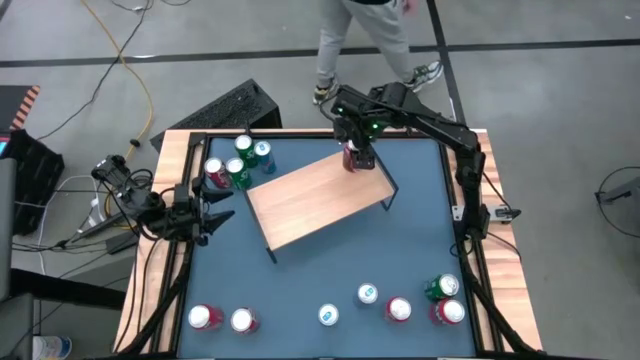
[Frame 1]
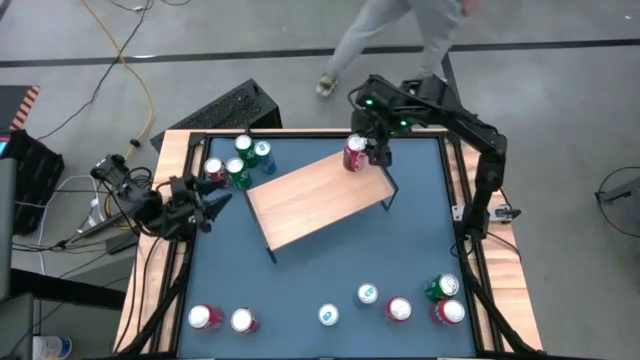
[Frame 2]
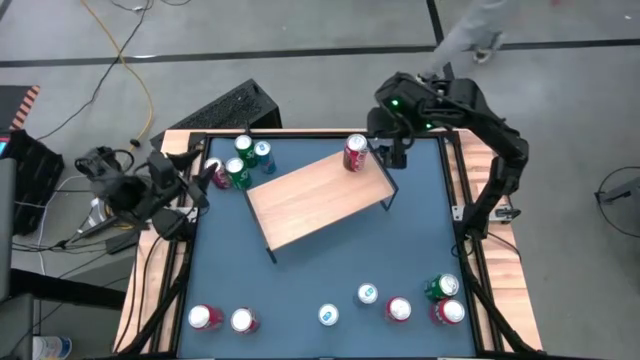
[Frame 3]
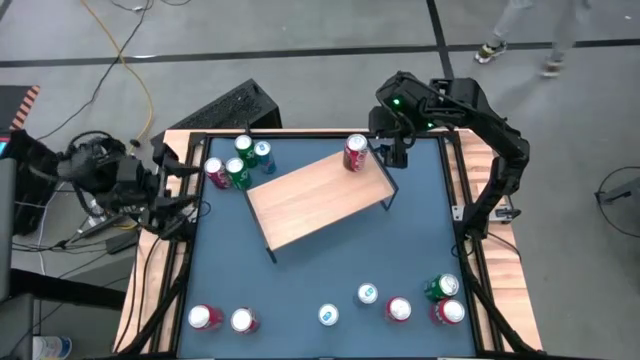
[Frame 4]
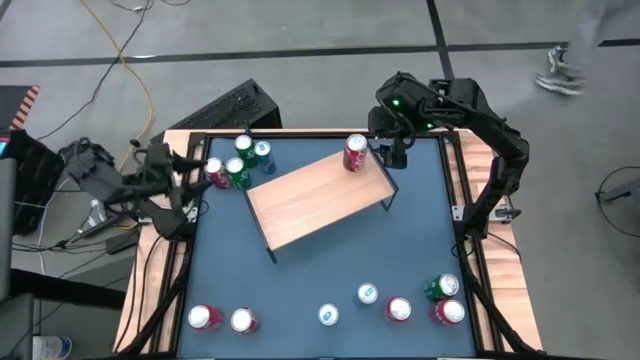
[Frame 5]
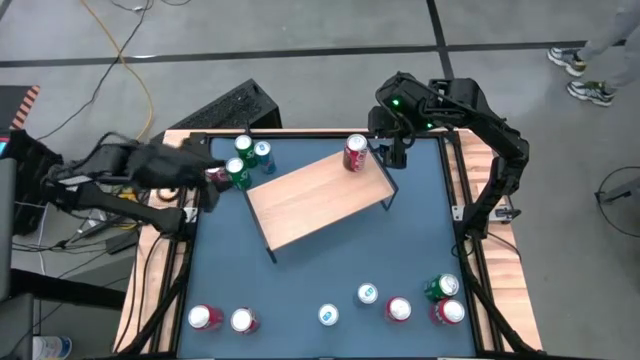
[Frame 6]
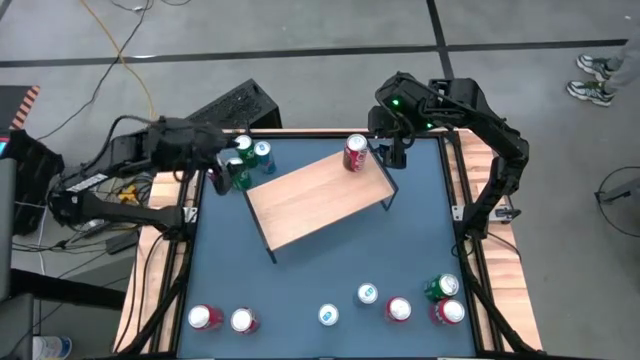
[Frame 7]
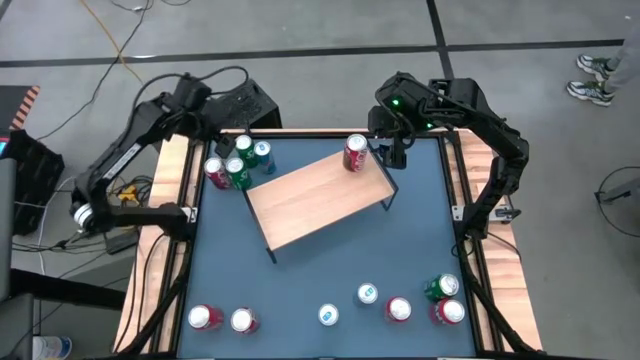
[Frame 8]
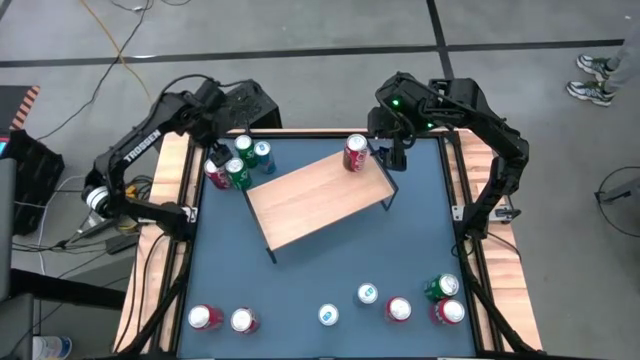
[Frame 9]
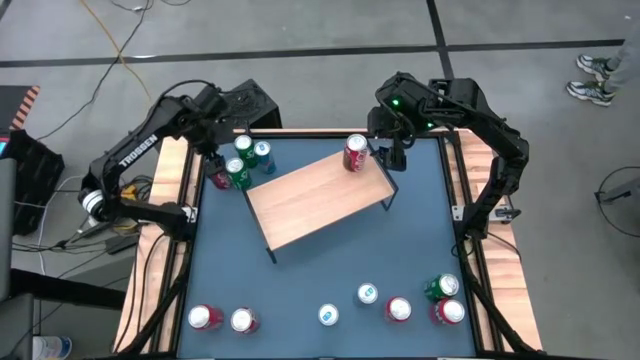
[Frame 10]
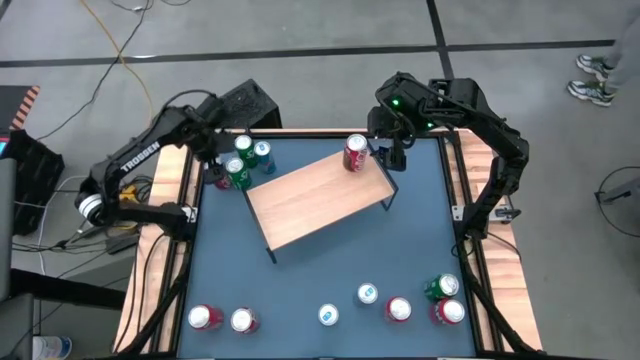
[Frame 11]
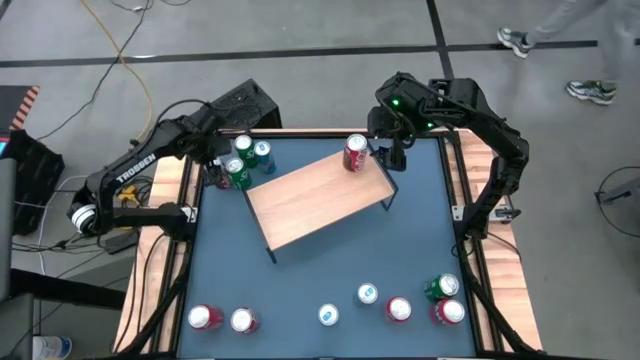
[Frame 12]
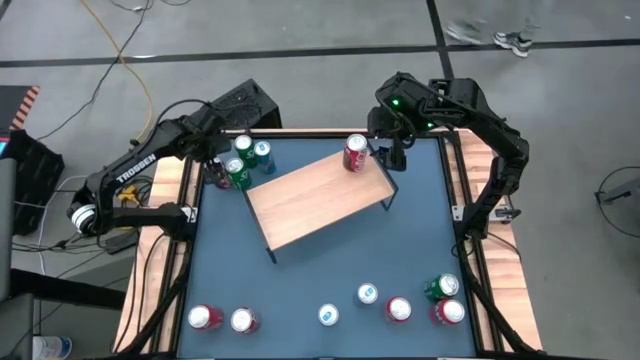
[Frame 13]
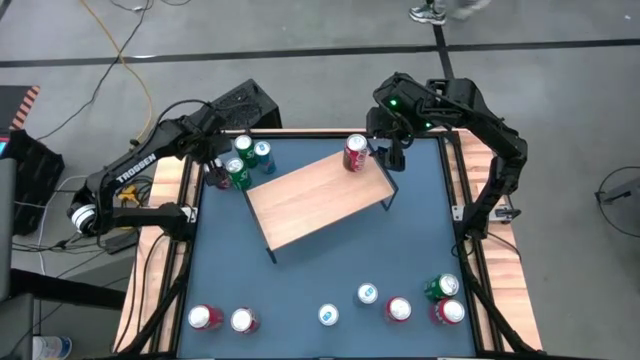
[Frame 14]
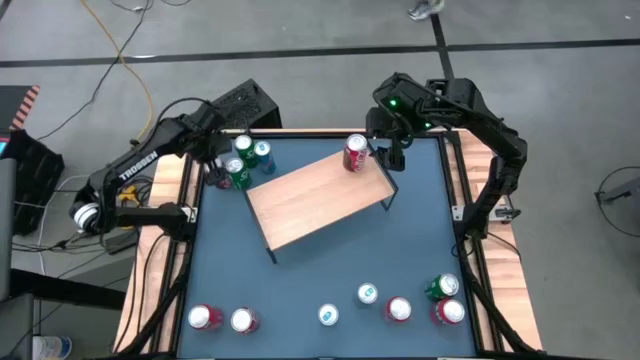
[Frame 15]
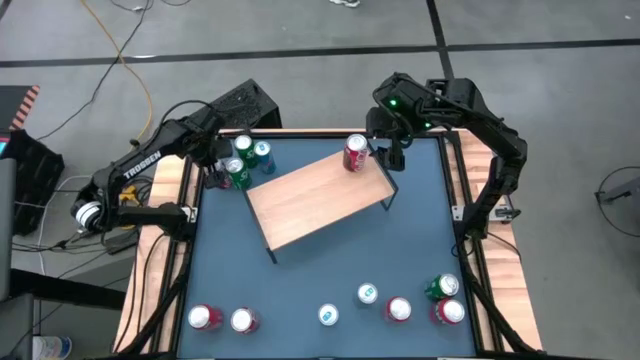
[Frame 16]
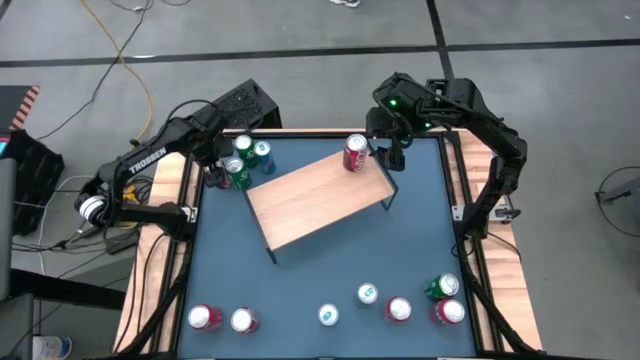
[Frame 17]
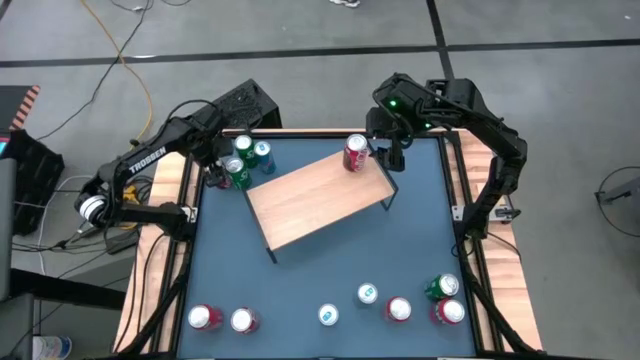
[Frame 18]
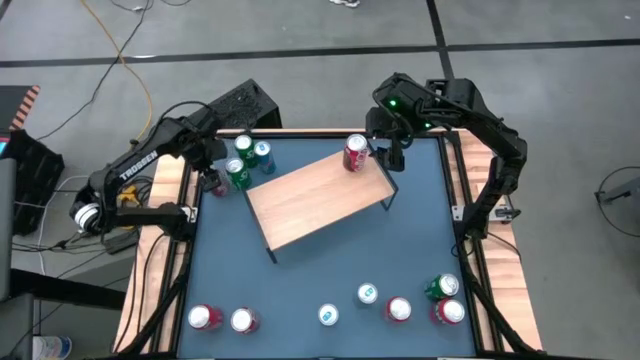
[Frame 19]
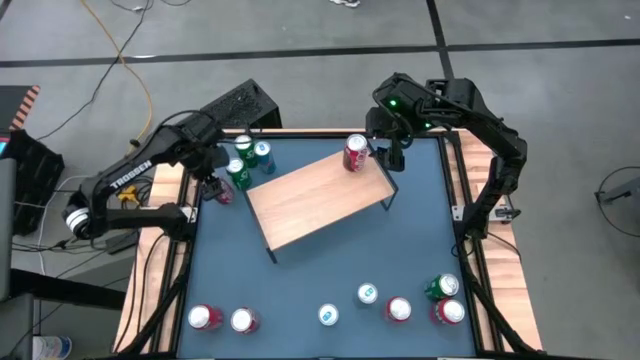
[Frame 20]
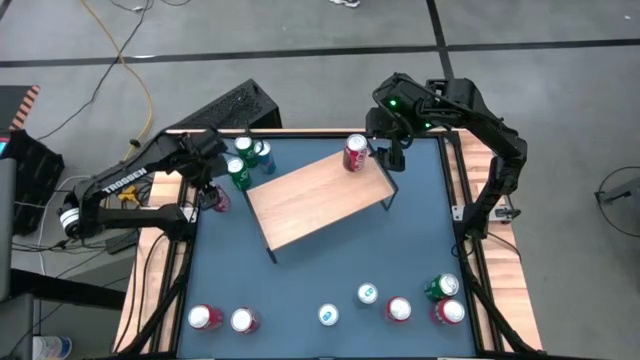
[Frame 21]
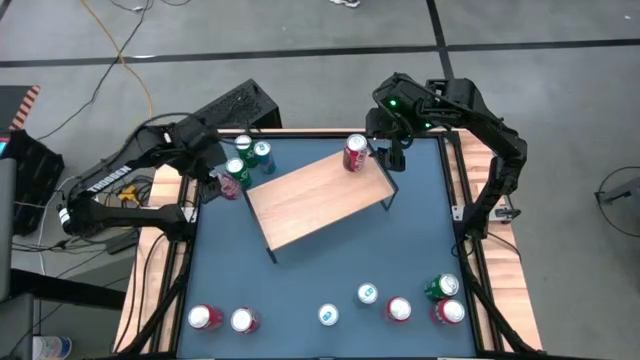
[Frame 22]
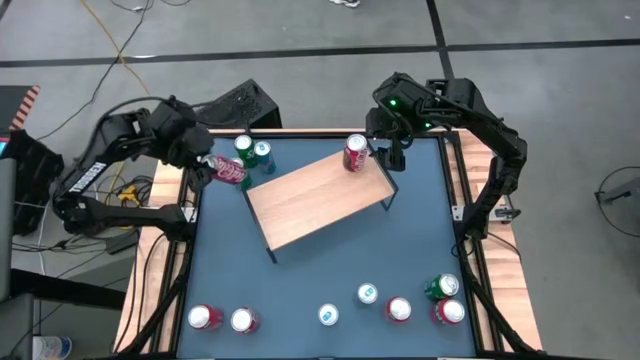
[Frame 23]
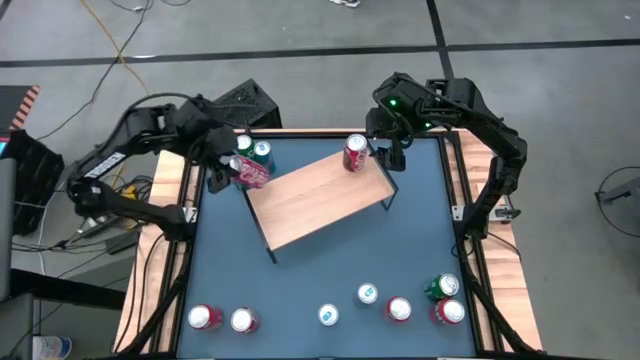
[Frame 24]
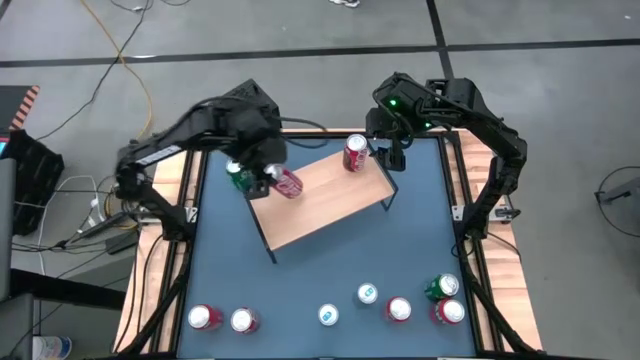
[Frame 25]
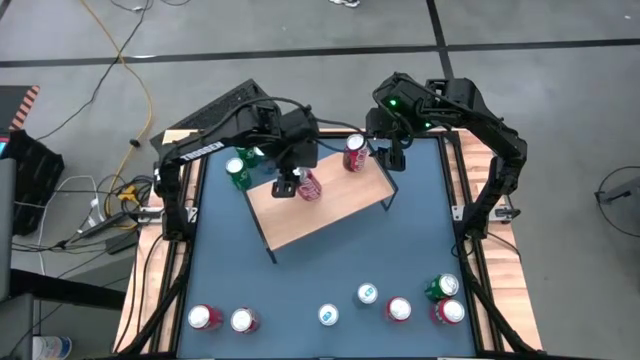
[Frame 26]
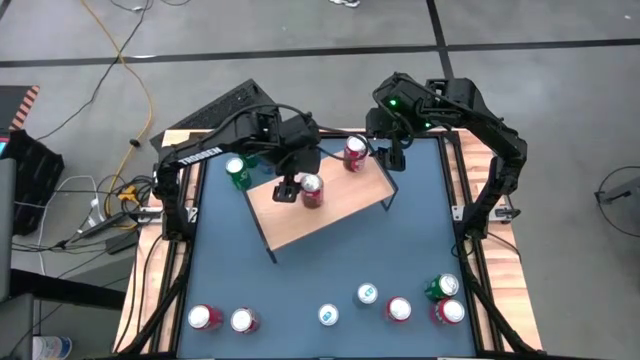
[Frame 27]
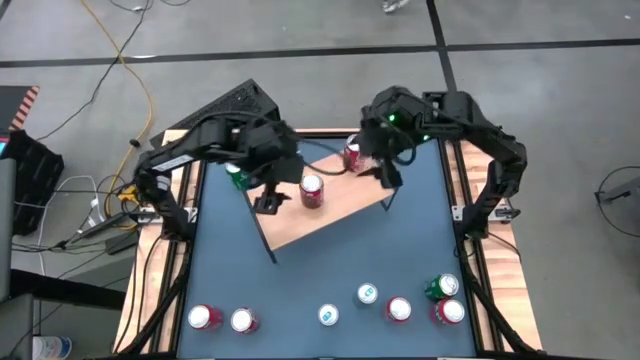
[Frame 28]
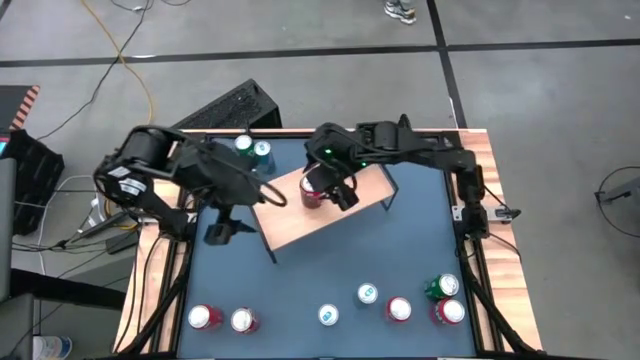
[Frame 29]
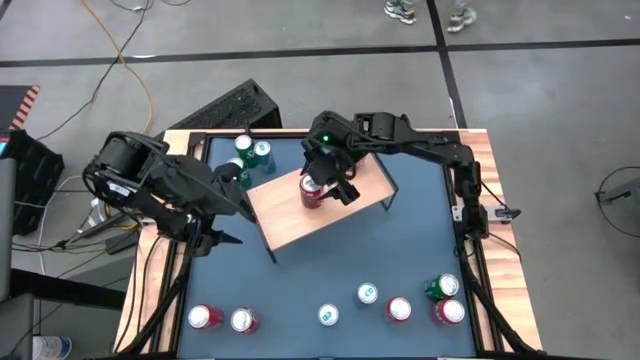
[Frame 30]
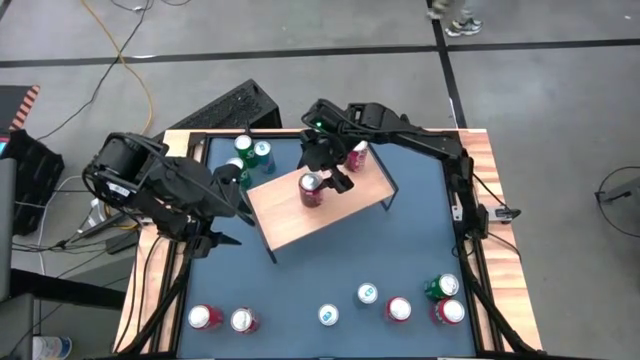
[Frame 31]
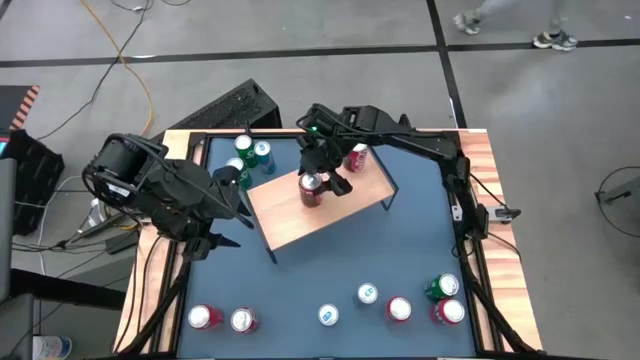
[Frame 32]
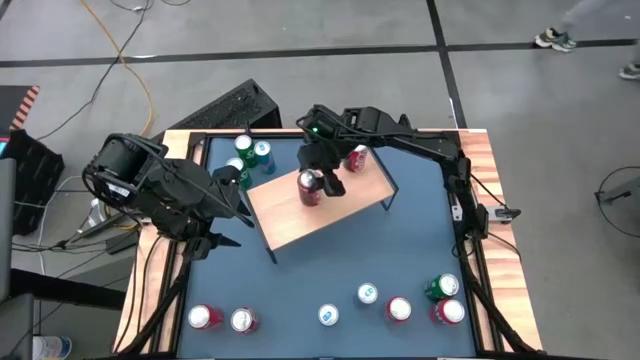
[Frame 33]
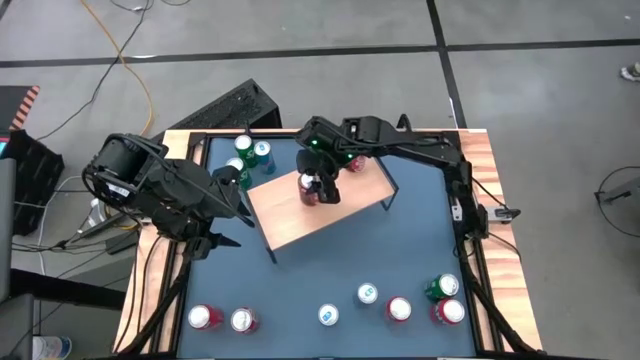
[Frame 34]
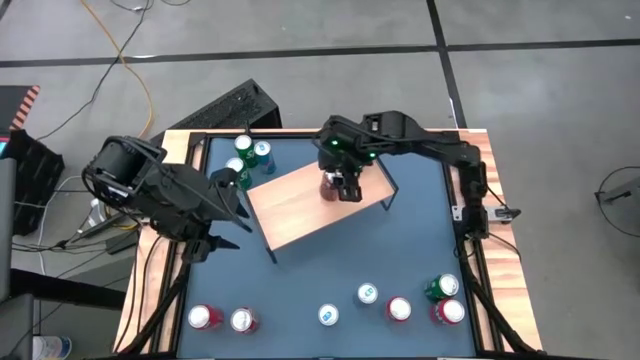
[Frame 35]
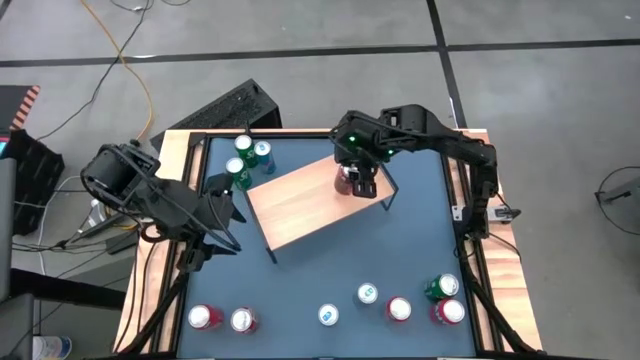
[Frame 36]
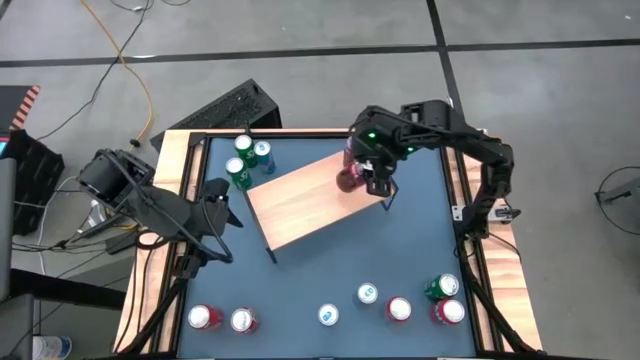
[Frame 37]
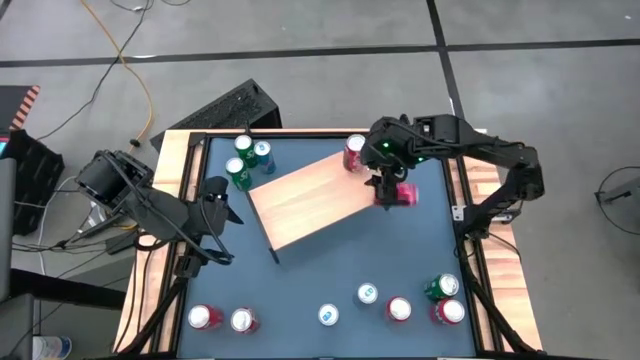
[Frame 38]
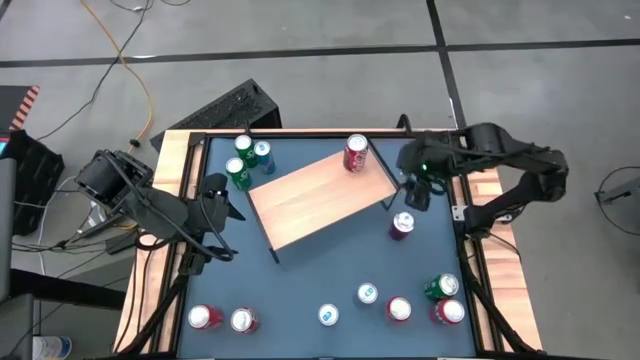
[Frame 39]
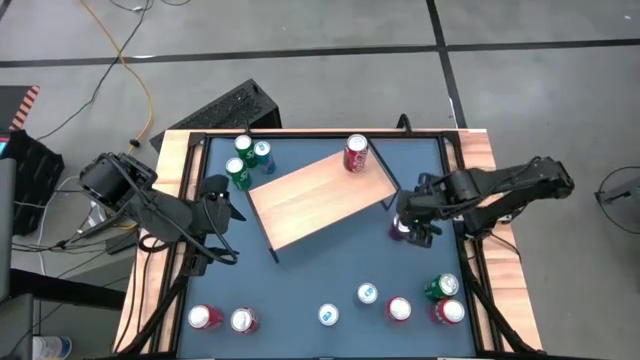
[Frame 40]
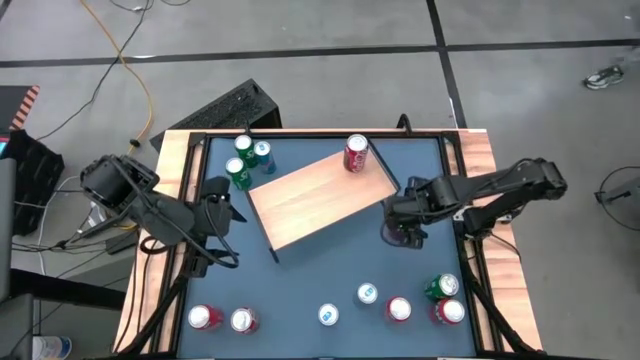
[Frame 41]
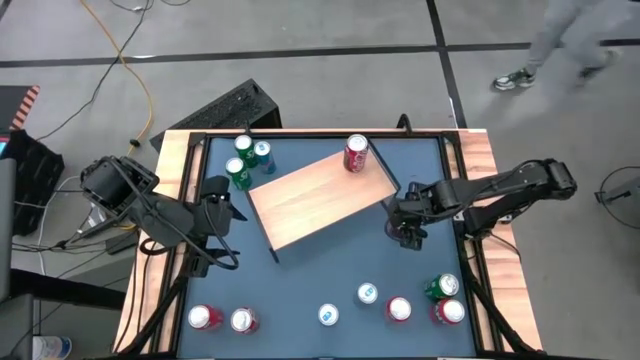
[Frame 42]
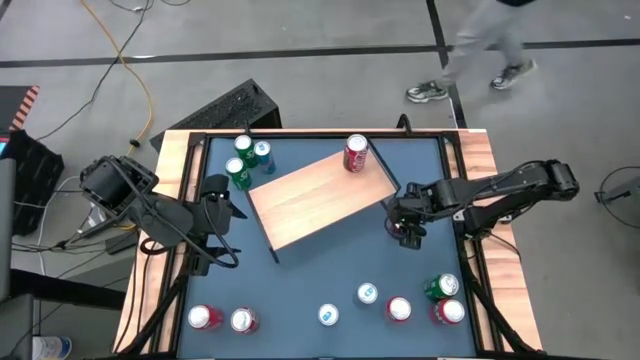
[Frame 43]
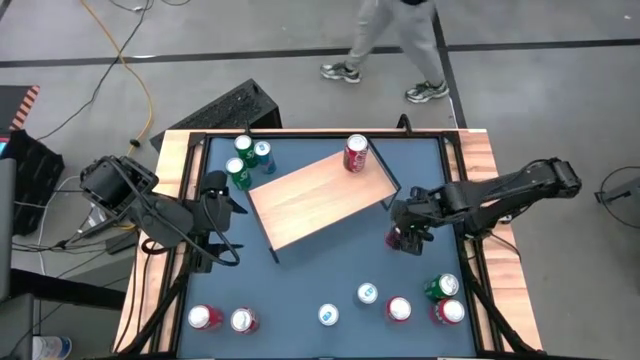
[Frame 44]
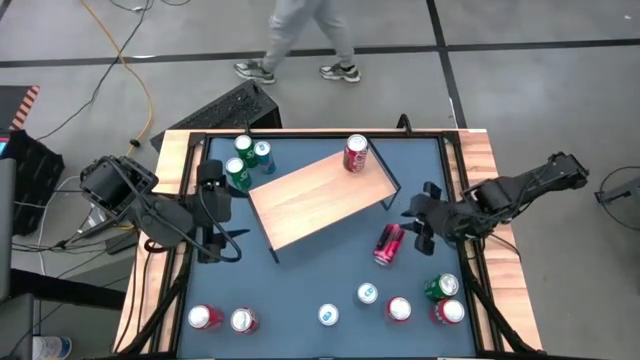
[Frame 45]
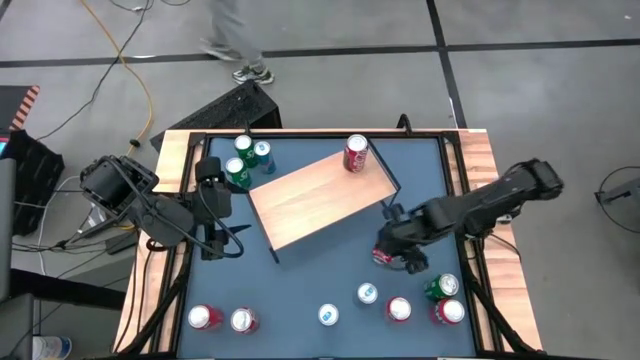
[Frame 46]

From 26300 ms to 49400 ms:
Task: Place canned beverage on shelf
Put the top red white soda can on the shelf aligned with the other red white soda can
